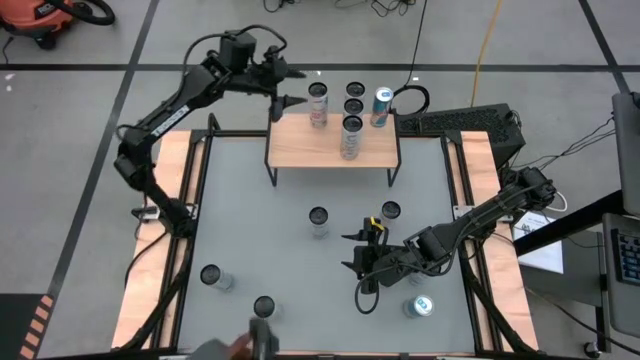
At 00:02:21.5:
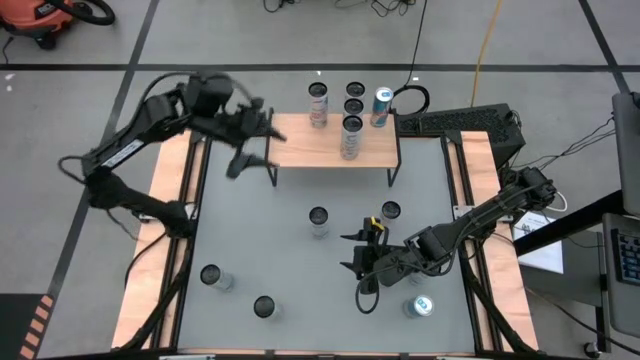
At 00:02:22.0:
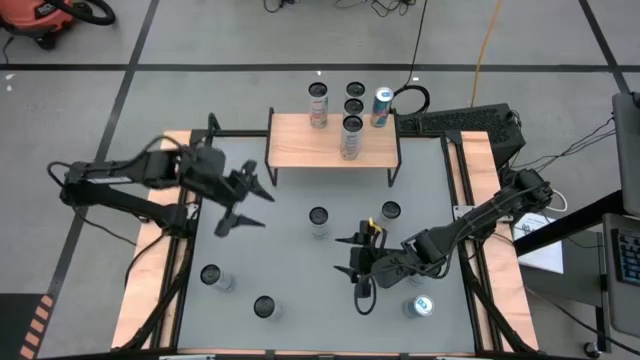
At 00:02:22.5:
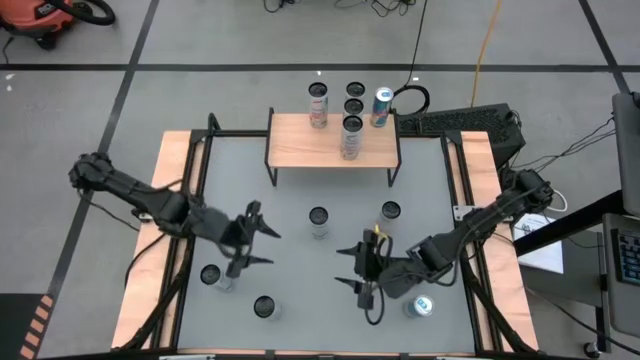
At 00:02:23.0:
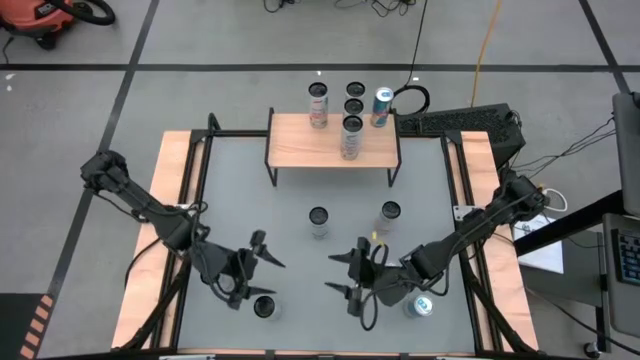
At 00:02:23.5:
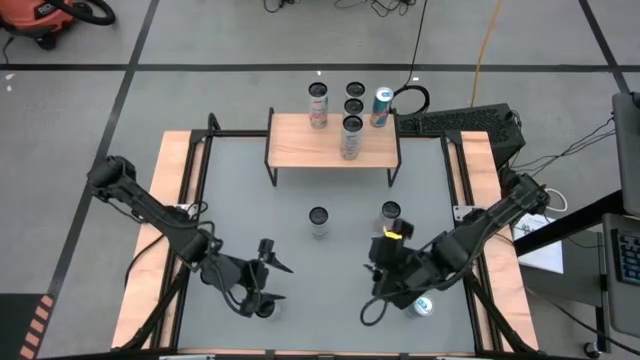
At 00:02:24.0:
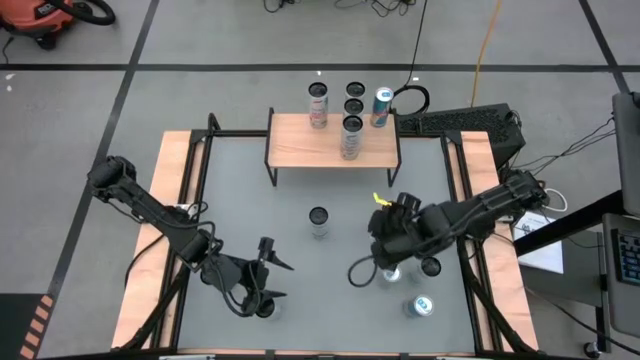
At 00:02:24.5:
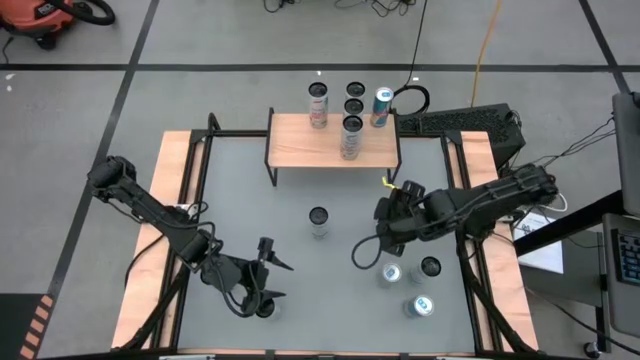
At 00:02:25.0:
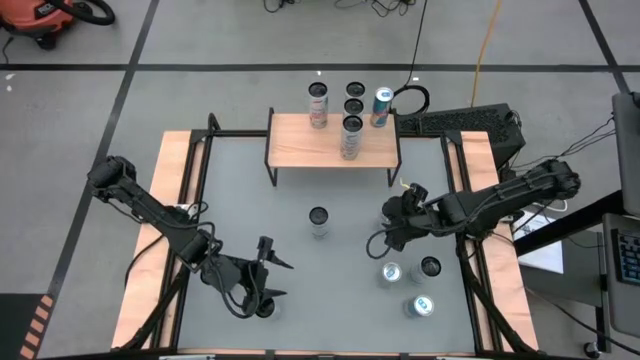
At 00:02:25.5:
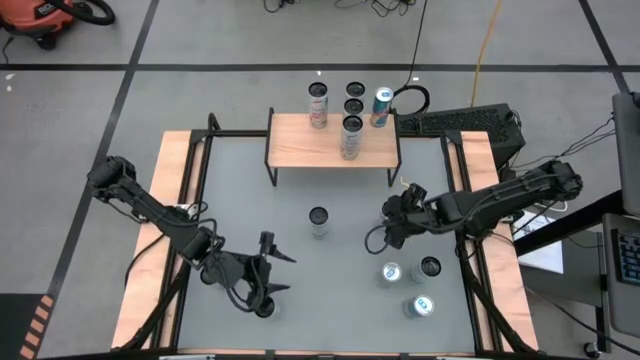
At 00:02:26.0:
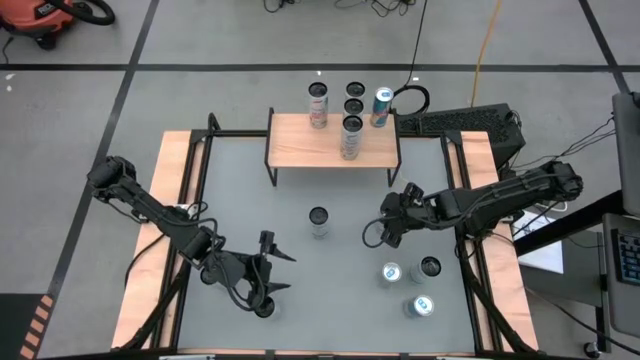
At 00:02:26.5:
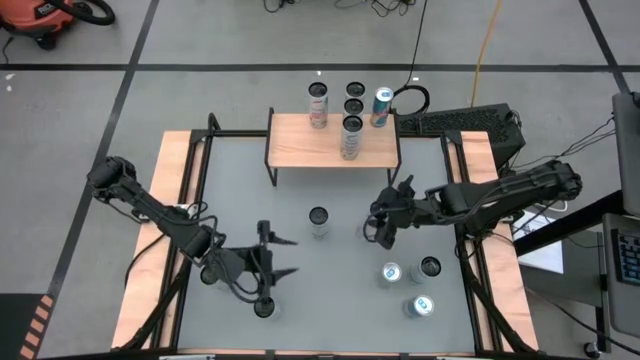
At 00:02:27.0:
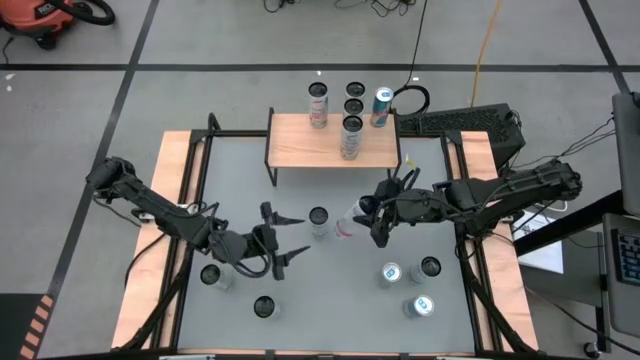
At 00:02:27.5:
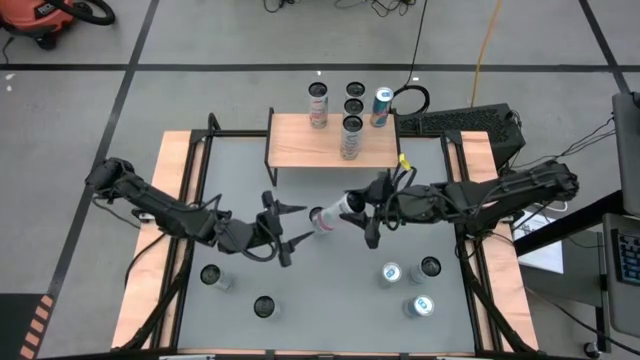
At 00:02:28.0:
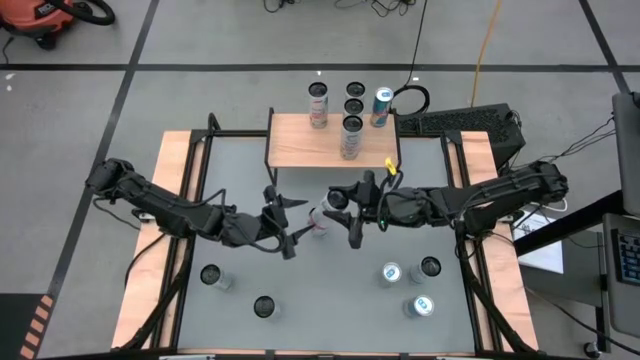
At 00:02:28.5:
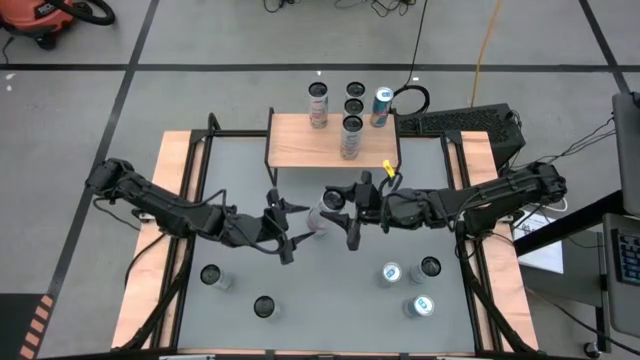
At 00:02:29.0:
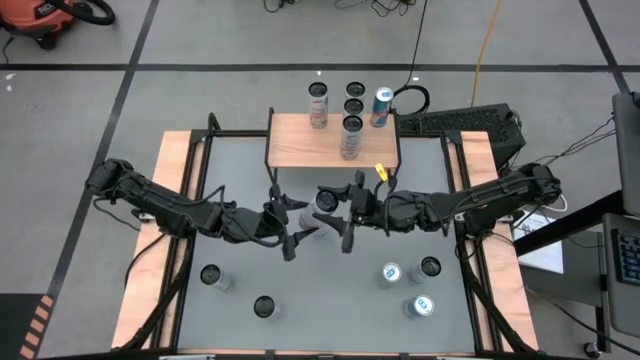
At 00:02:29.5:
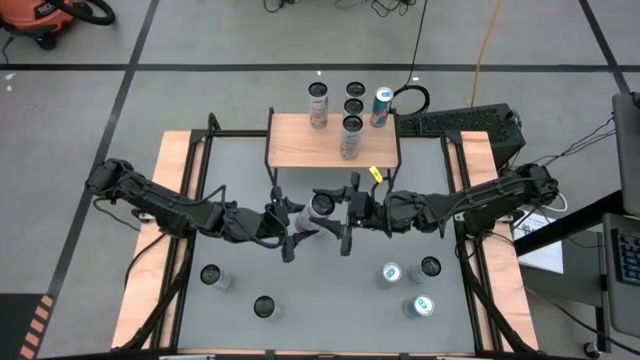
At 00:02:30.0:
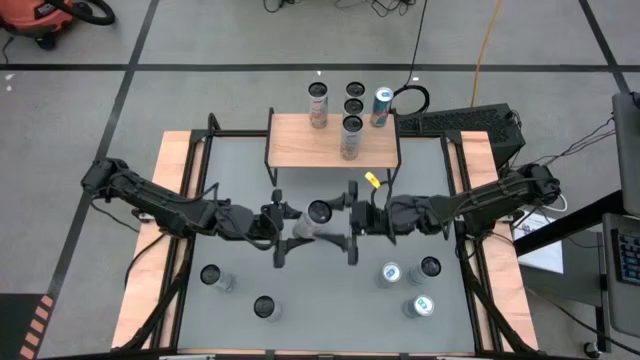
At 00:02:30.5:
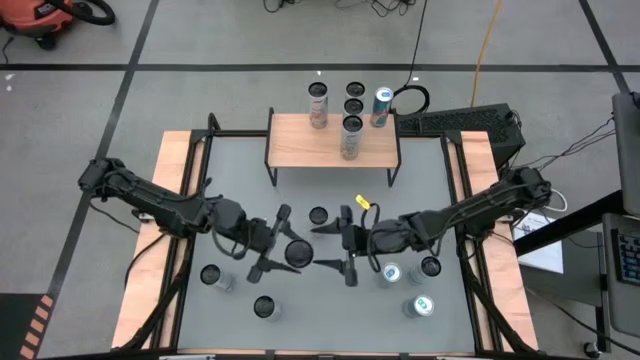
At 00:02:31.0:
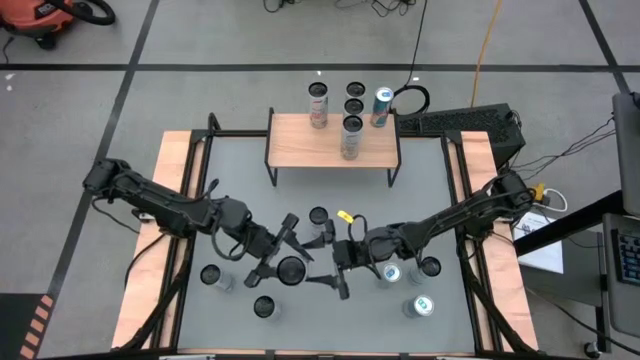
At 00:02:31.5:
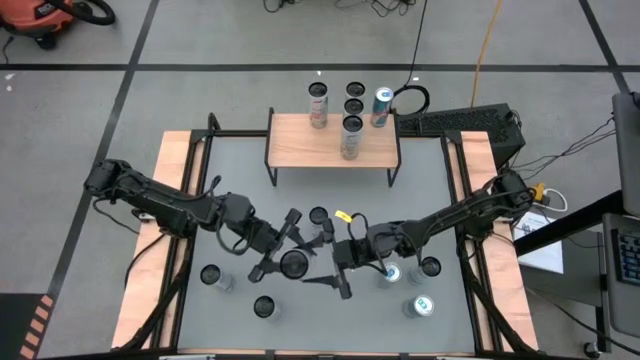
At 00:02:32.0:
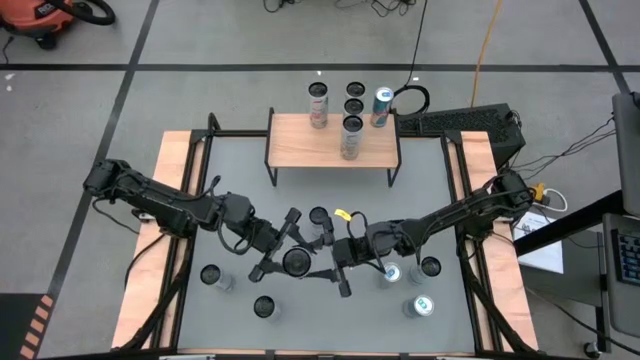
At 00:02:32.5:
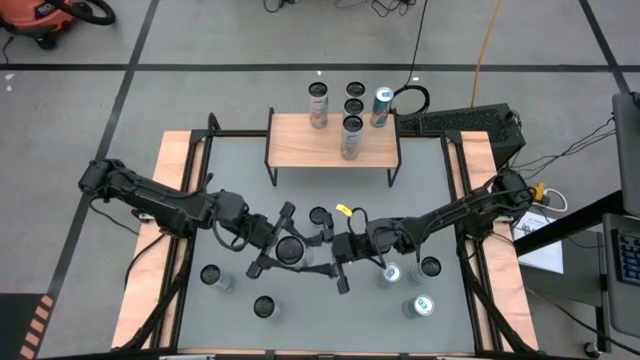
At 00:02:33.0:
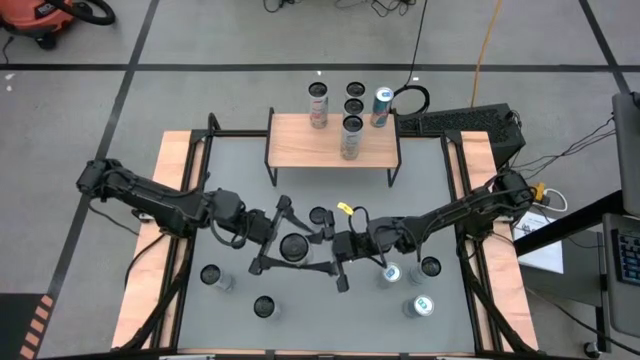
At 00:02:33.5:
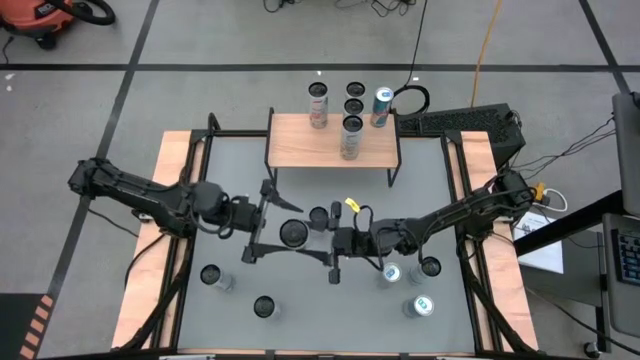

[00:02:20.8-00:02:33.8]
Task: Place canned beverage on shelf
Put the top white pink soda can on the shelf aligned with the other white pink soda can

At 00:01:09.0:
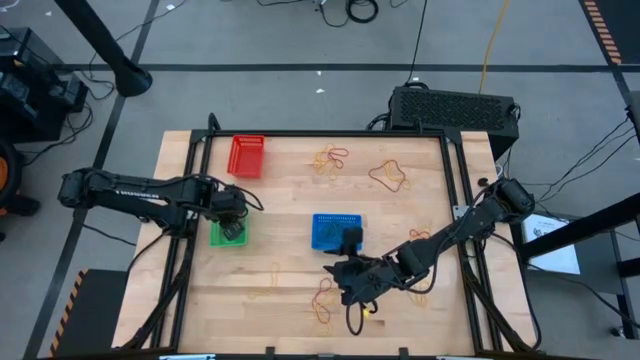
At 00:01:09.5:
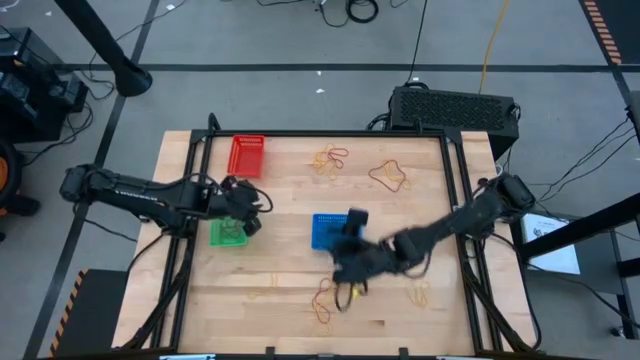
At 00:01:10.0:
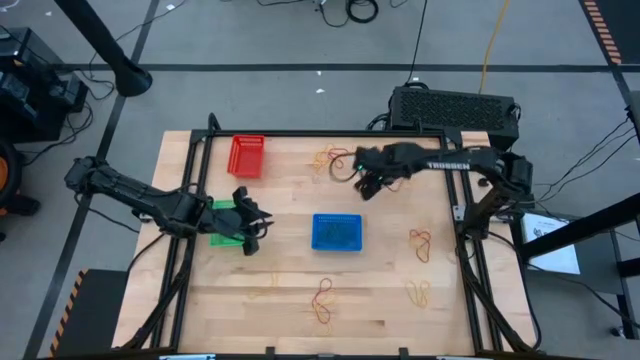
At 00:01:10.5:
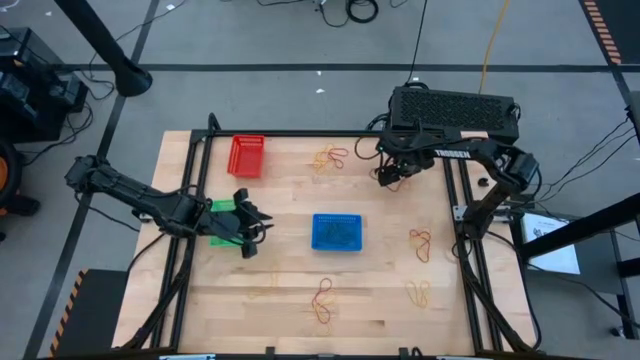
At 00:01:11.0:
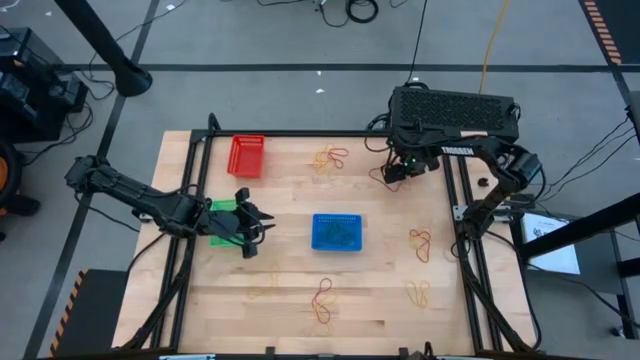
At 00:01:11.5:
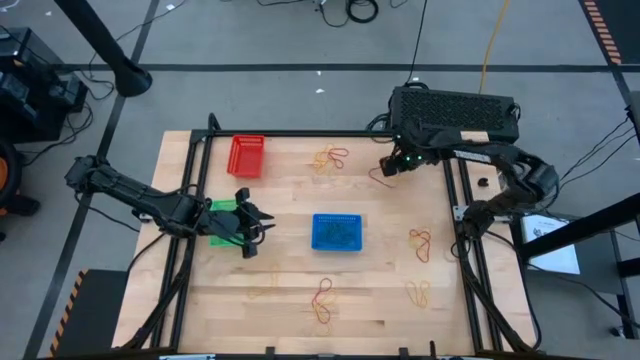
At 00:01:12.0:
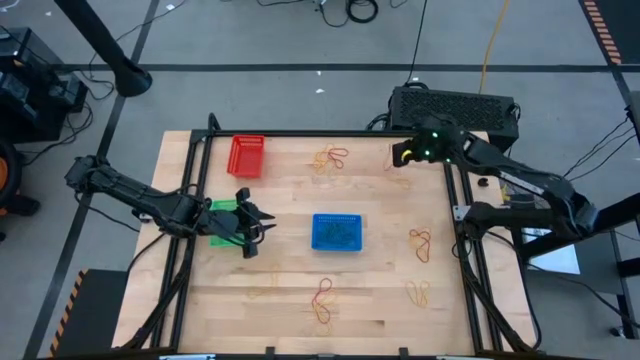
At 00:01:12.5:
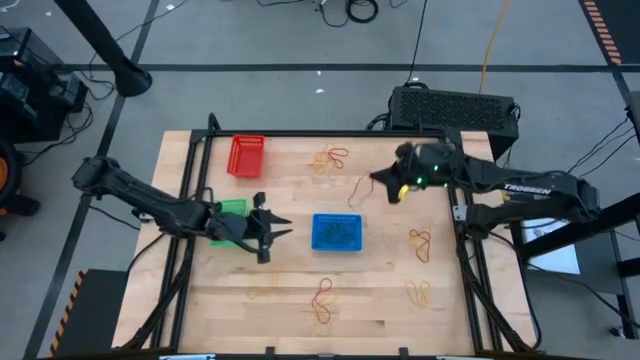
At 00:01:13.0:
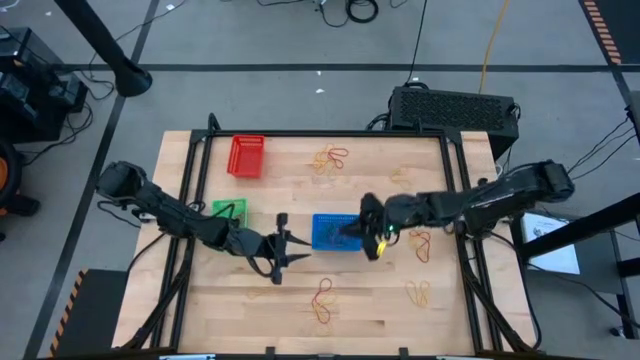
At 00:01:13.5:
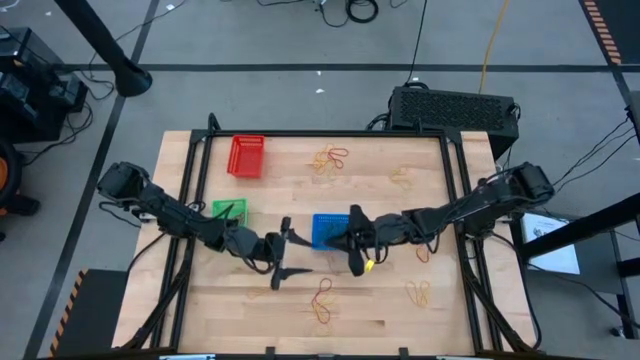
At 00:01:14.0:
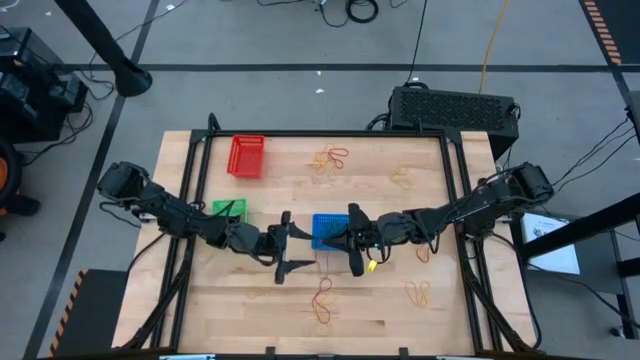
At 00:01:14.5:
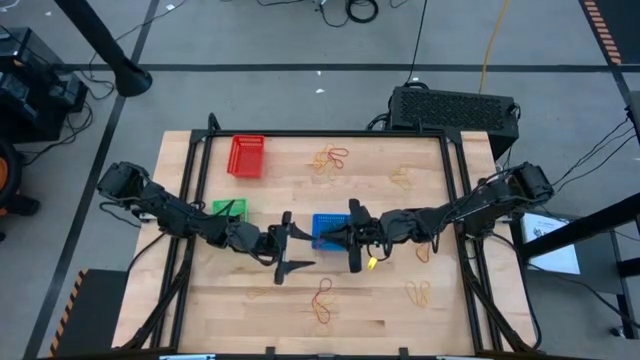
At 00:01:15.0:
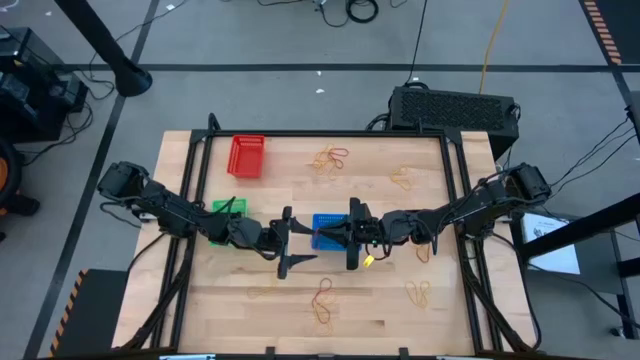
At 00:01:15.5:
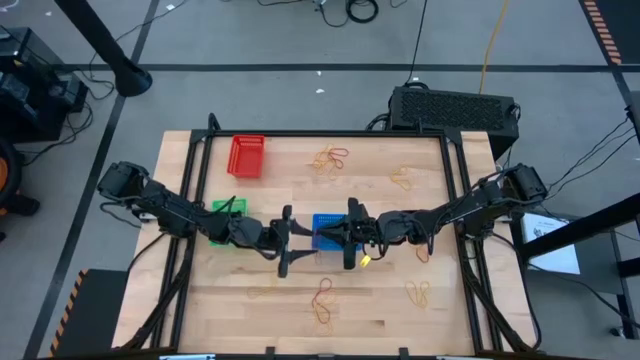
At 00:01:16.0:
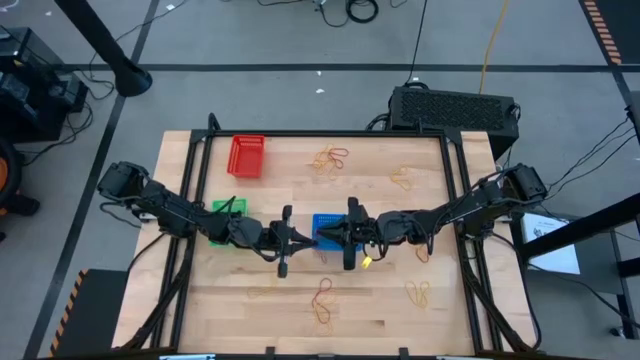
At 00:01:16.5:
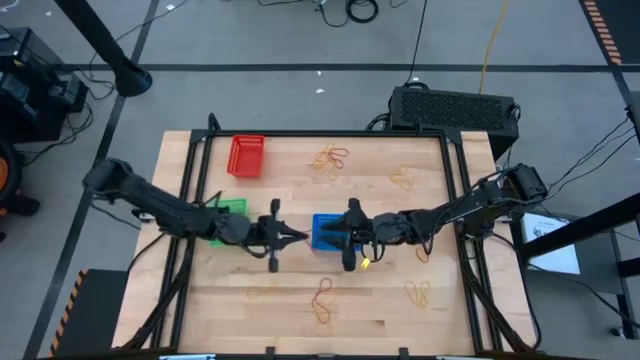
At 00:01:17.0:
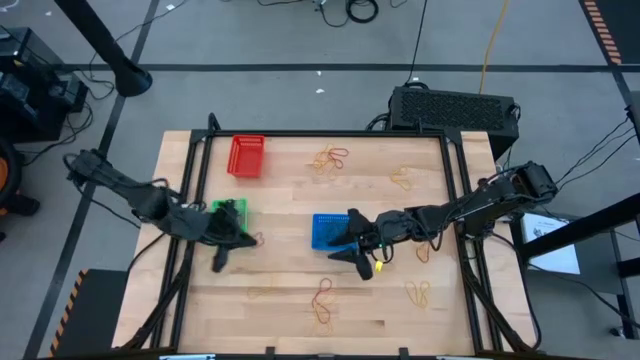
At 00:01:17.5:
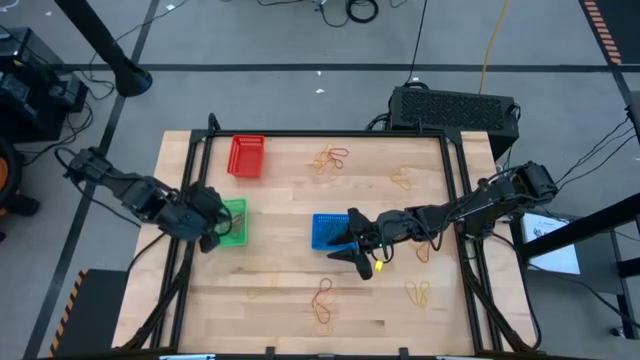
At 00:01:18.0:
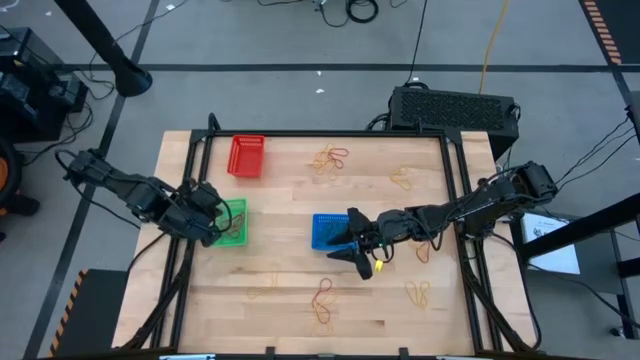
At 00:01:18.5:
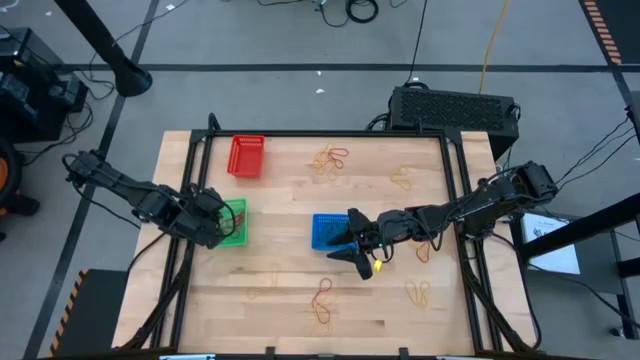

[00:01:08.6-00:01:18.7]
Task: Sort rubber bands into baskets
Put the red rubber band into the green bin
